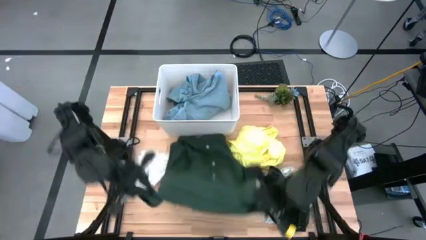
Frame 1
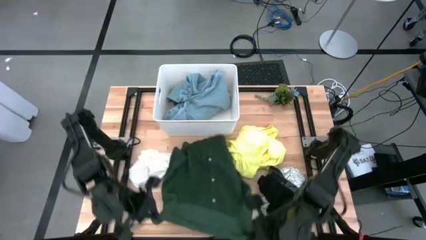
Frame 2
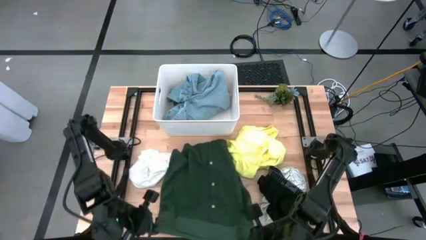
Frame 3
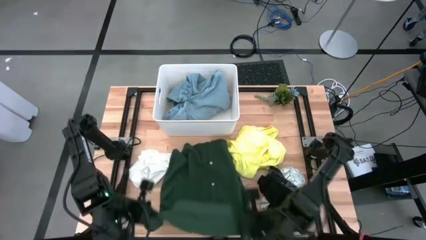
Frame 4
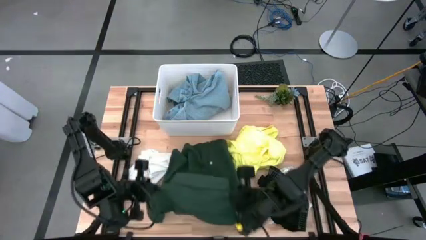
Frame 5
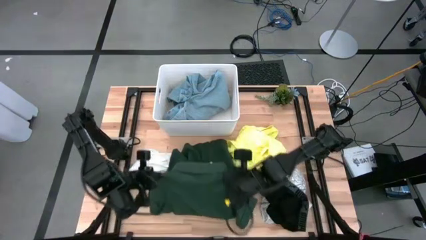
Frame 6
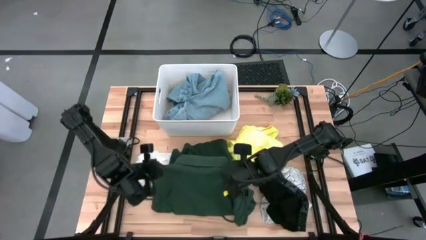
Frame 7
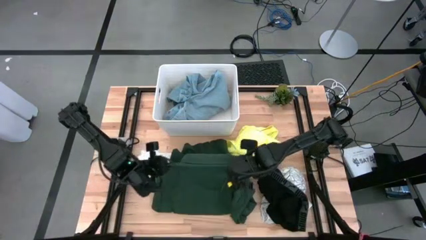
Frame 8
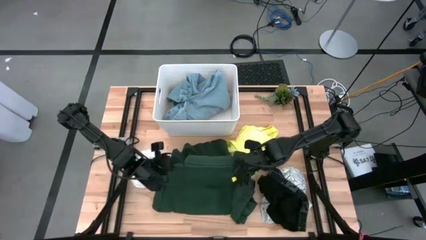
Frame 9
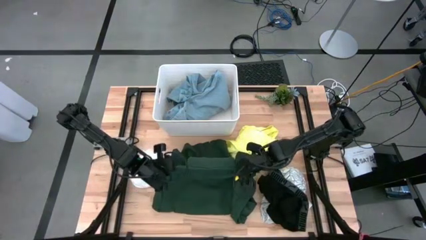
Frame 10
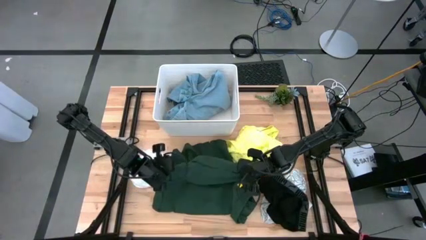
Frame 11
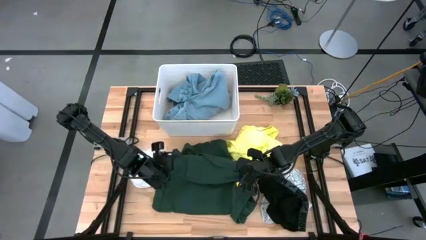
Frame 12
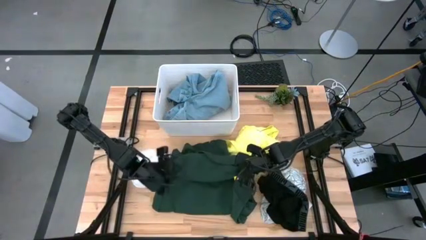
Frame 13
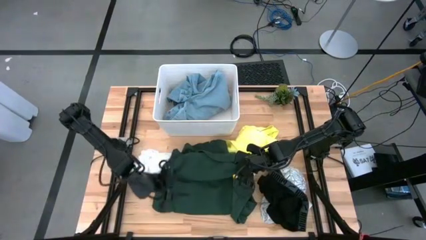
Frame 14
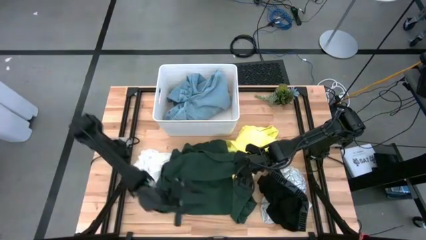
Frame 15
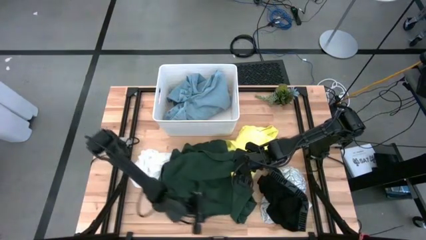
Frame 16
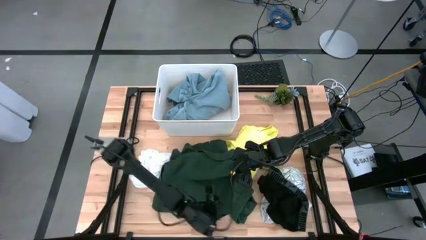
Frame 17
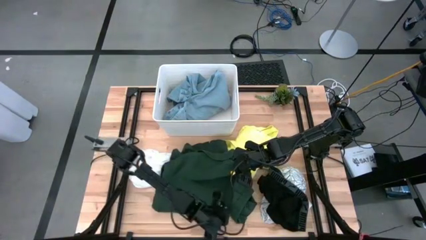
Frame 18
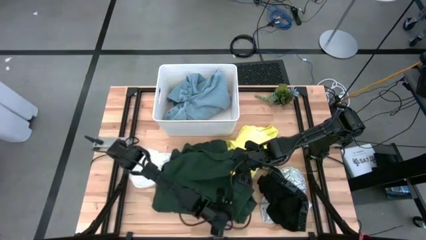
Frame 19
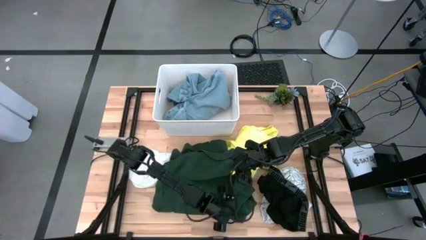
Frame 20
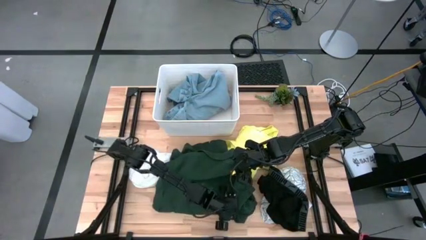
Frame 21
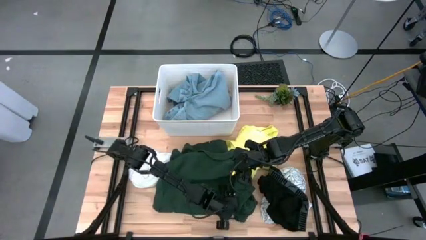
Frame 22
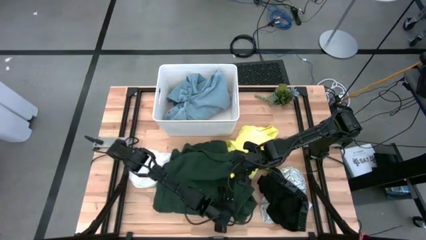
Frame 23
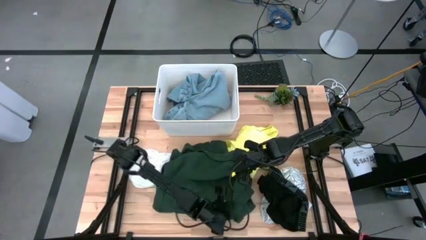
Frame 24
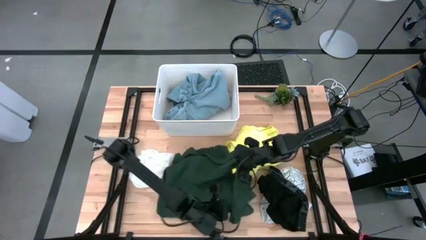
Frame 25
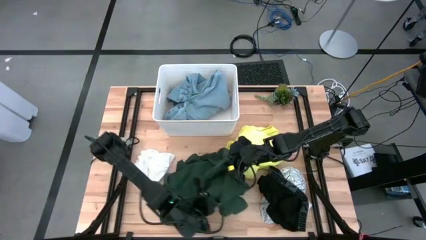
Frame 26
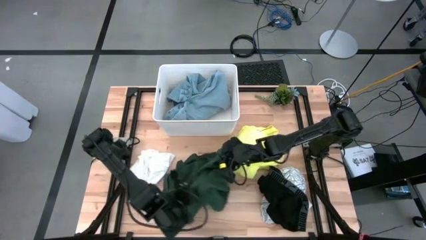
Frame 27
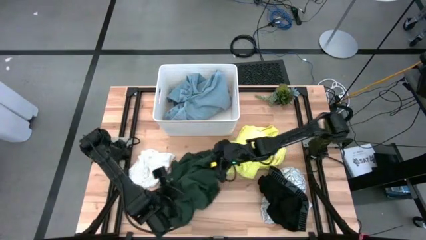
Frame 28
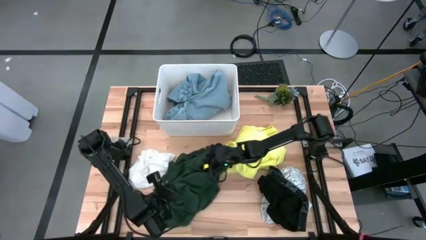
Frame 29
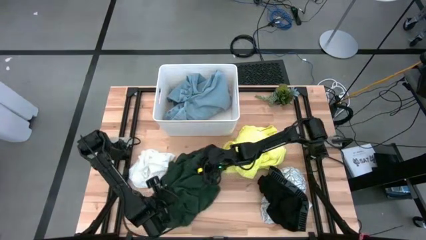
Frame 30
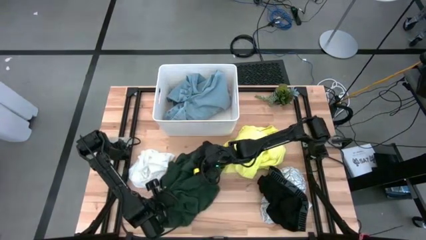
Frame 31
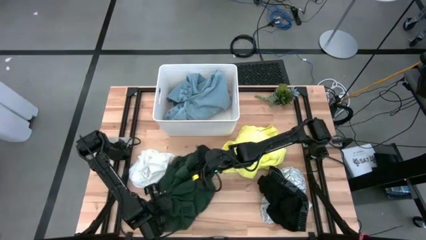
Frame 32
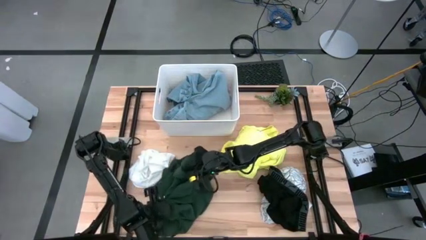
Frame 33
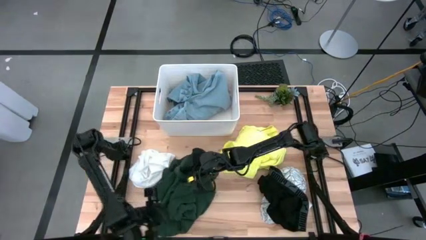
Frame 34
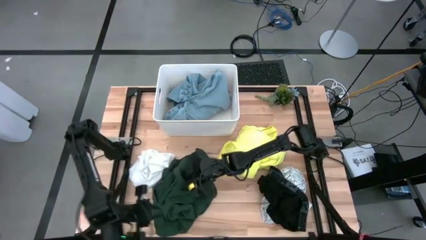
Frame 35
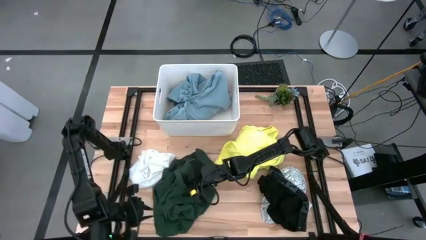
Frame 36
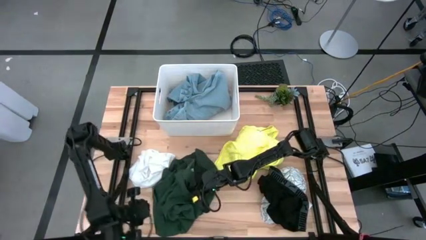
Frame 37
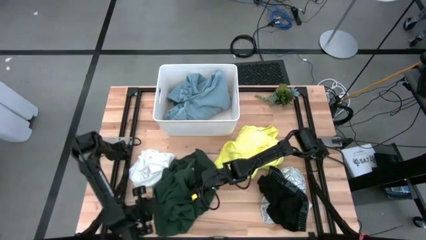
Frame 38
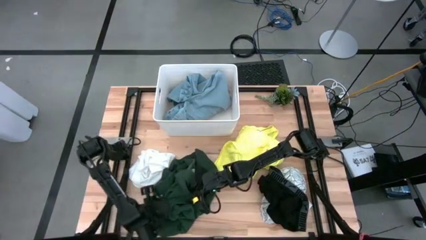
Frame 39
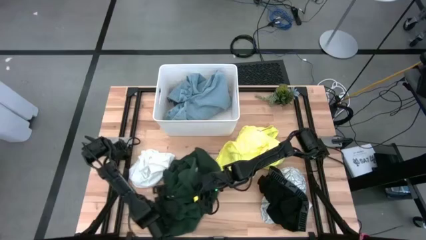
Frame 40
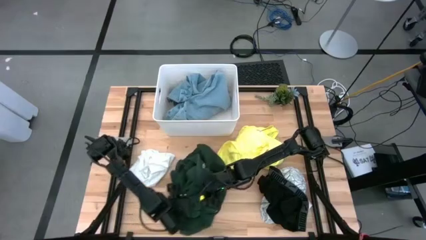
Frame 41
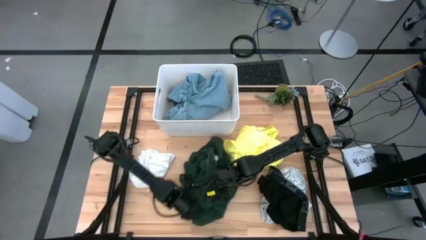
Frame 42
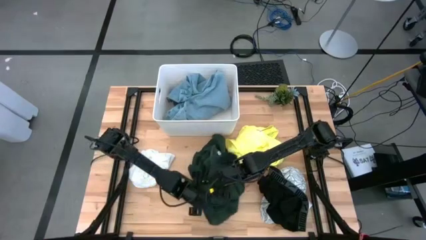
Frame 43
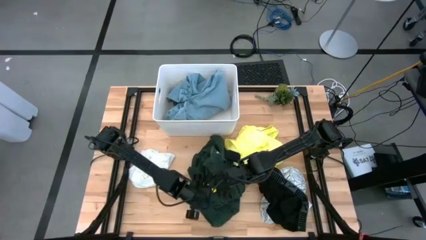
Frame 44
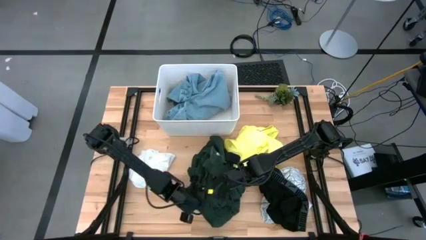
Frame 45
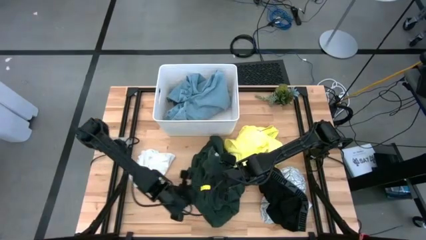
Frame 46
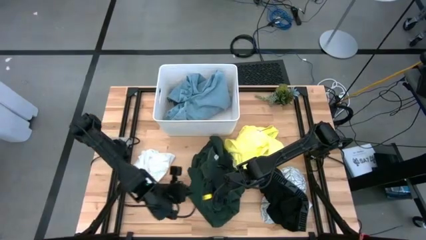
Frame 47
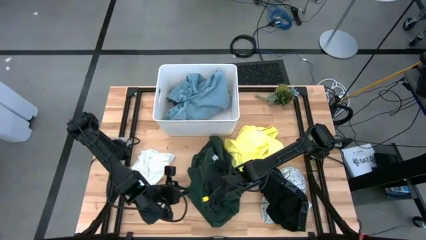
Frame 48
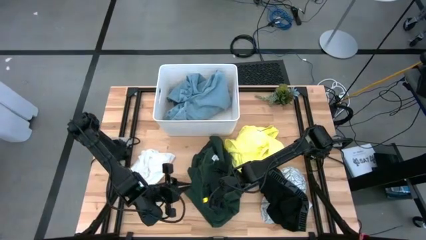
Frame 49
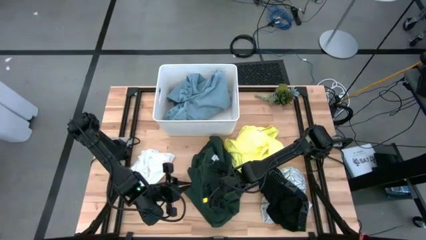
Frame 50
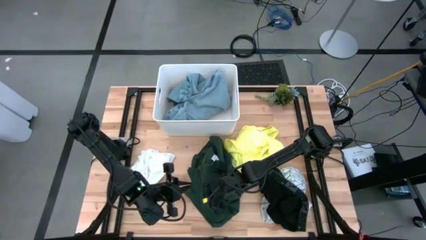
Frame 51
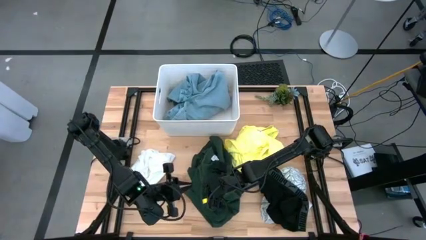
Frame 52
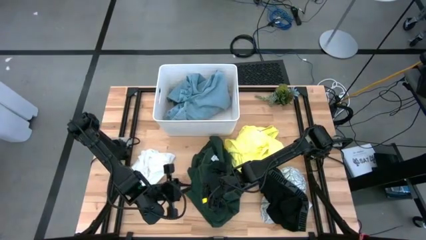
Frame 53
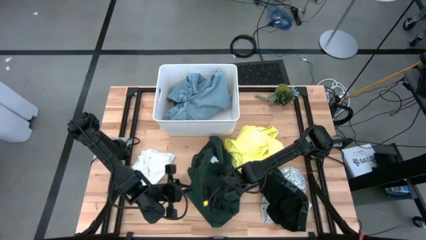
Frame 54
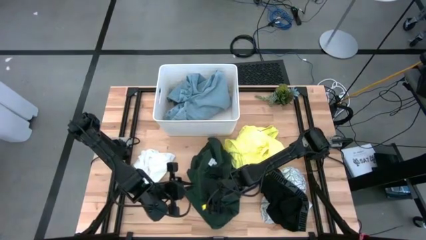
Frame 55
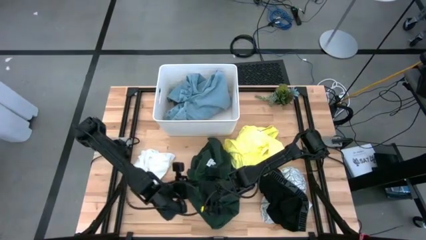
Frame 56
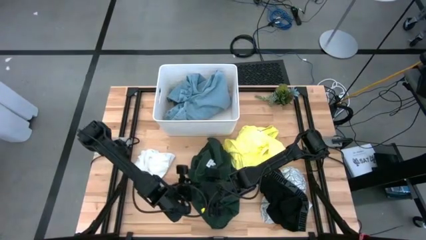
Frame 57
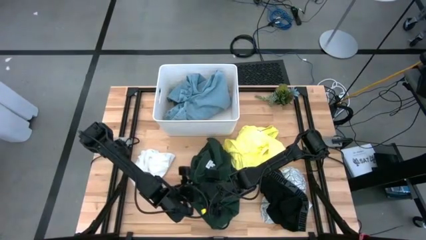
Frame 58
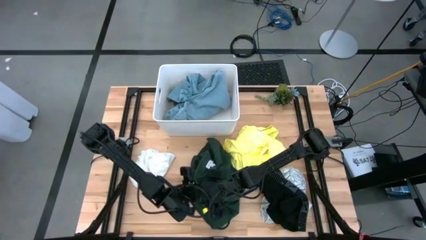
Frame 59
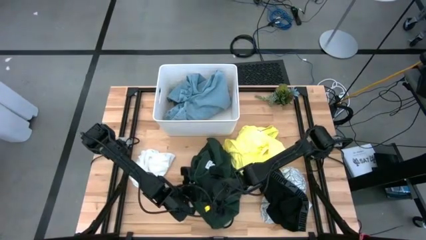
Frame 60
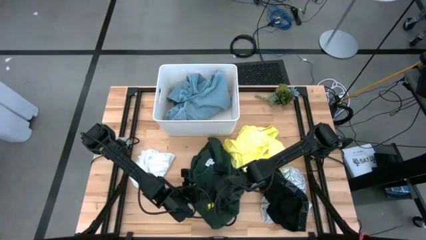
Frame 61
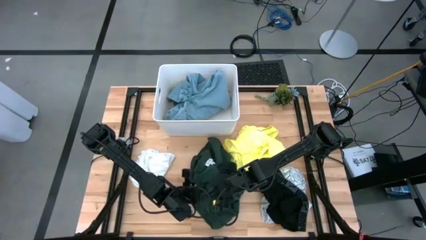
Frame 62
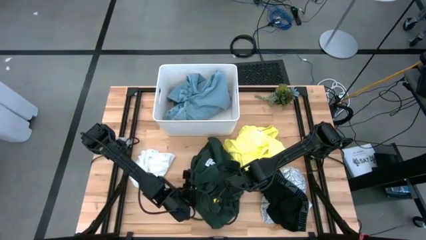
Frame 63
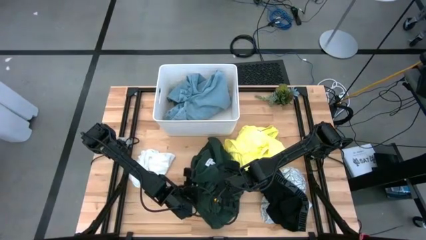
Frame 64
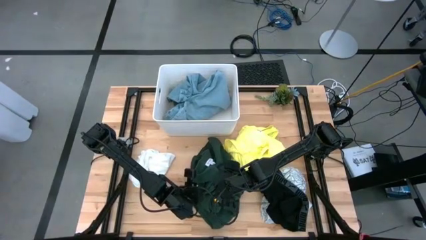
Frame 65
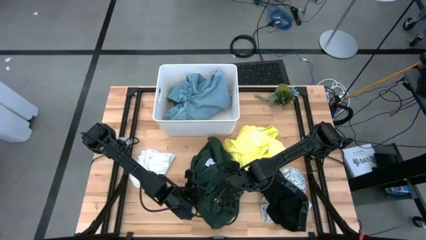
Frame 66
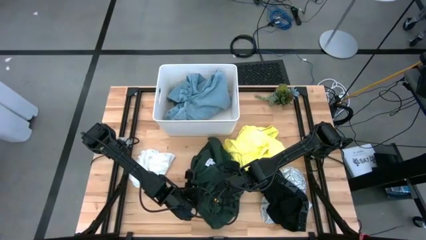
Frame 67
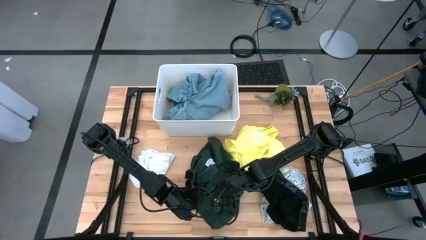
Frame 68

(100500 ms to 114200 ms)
Task: Fold laundry
Fold the green shirt

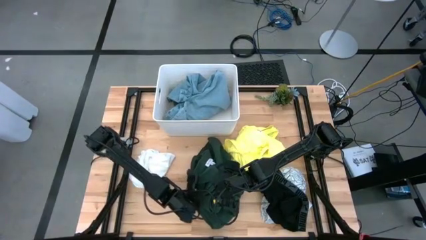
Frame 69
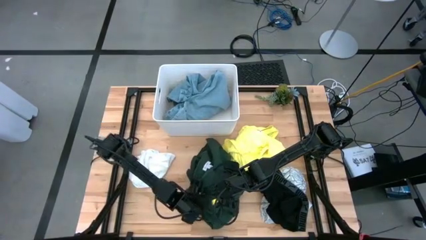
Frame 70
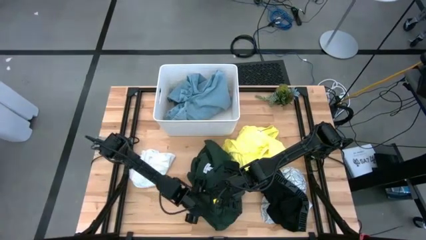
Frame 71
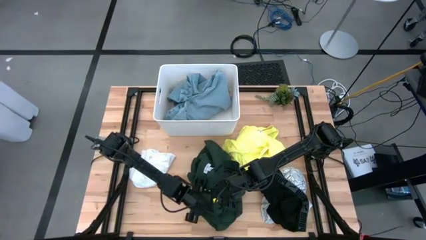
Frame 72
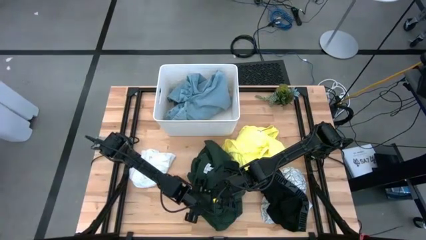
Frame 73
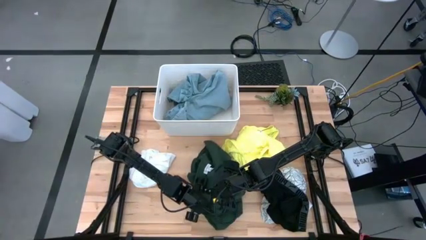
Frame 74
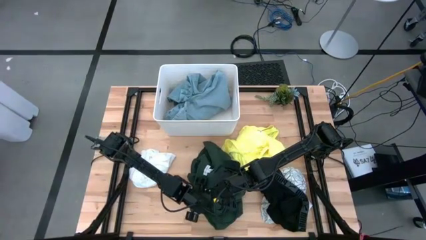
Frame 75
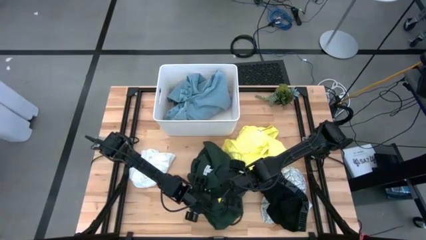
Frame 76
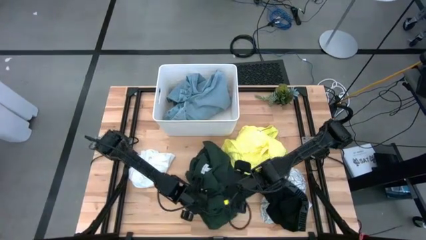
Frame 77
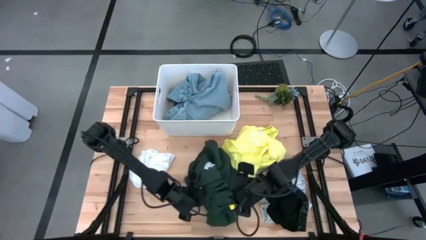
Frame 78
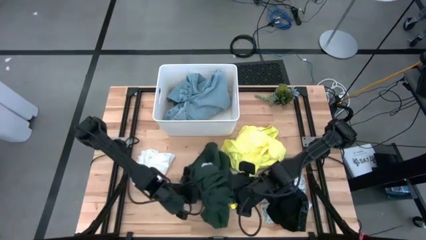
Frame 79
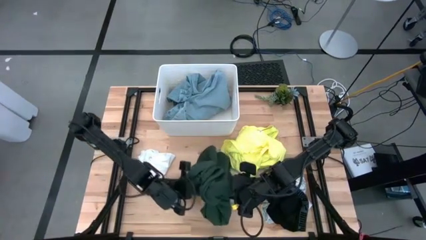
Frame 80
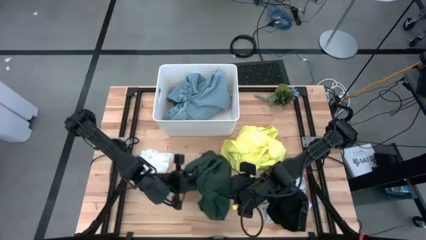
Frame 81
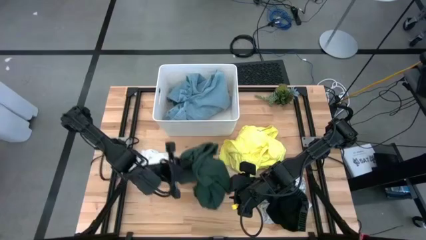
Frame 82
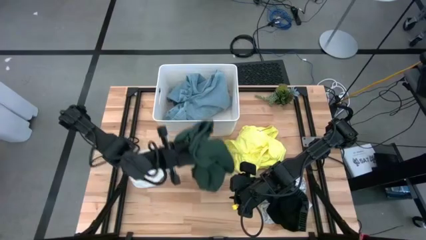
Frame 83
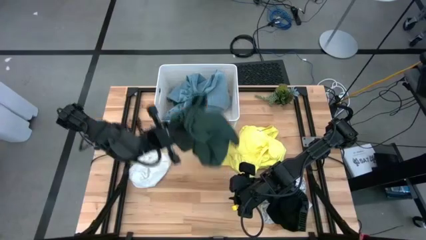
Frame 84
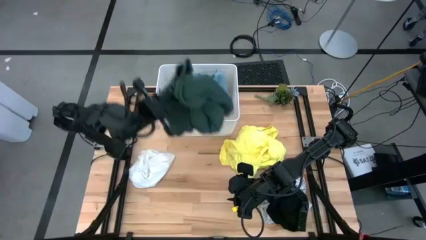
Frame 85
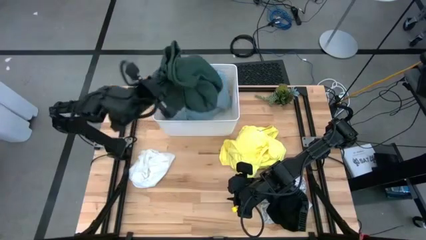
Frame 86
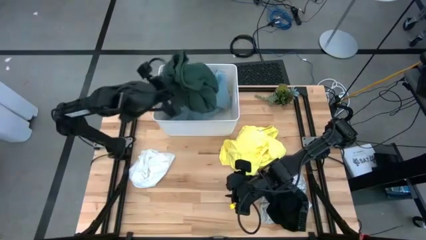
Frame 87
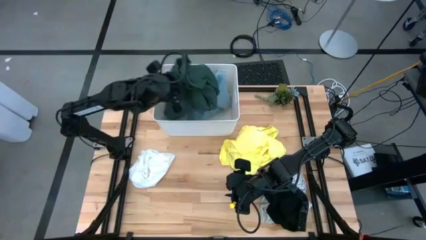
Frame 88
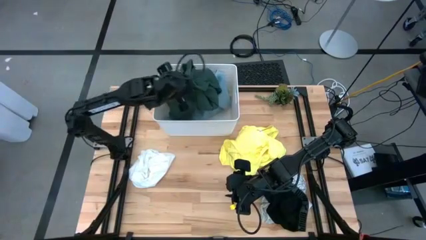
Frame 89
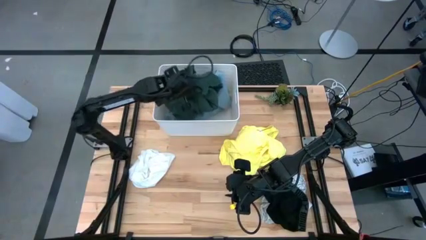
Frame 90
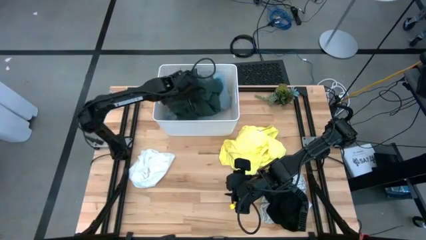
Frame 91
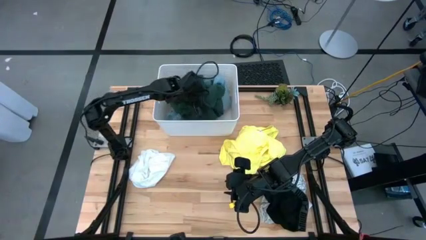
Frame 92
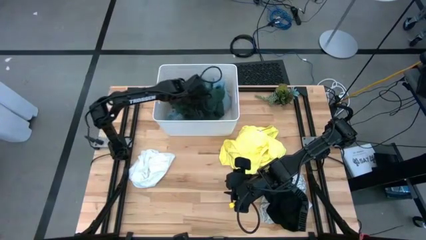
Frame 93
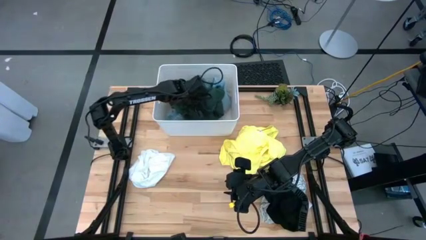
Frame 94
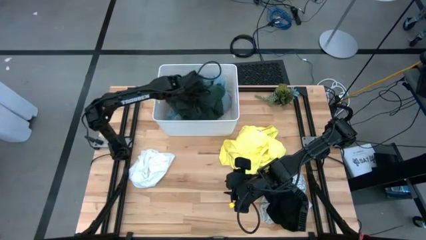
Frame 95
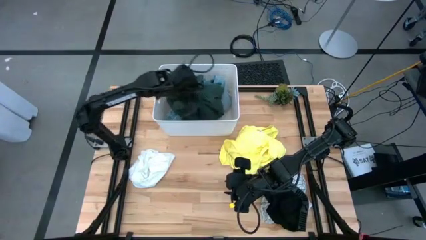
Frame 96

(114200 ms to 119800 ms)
Put the folded green shirt into the white laundry bin
